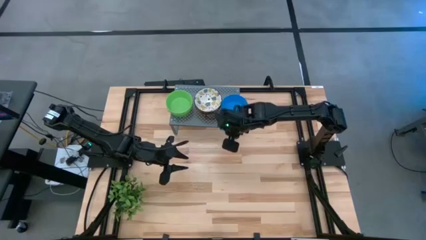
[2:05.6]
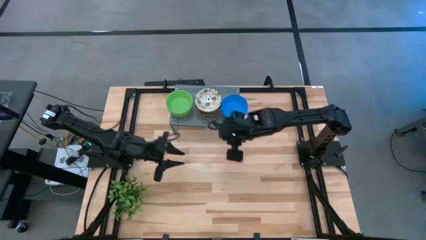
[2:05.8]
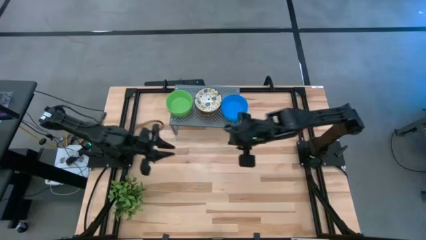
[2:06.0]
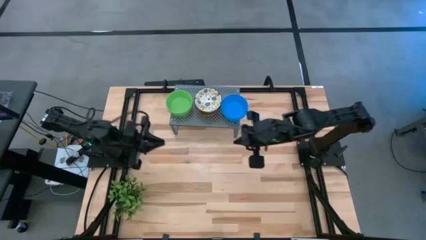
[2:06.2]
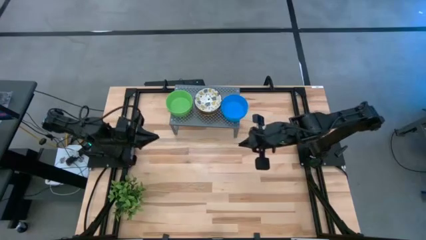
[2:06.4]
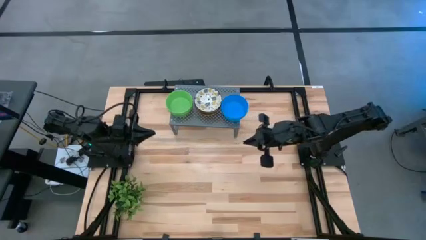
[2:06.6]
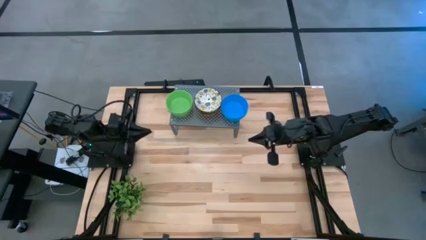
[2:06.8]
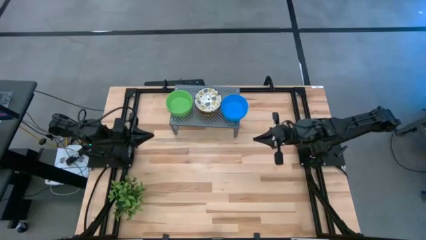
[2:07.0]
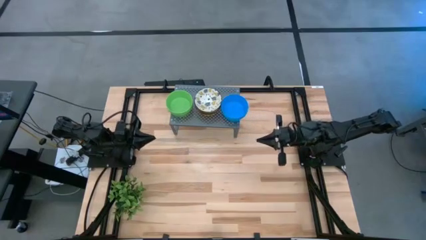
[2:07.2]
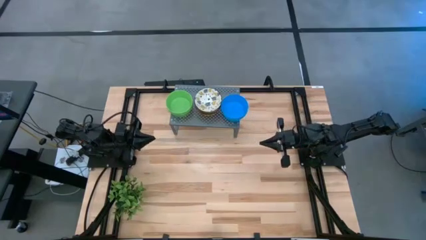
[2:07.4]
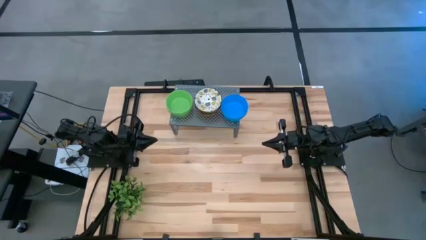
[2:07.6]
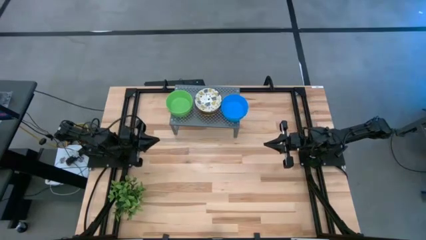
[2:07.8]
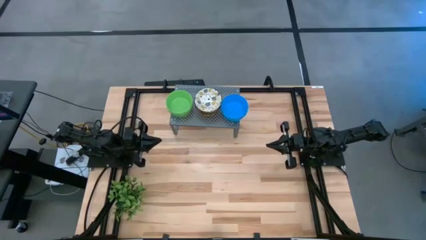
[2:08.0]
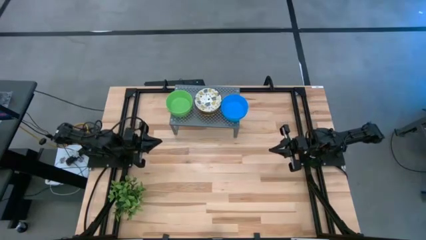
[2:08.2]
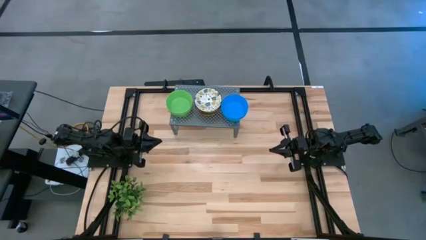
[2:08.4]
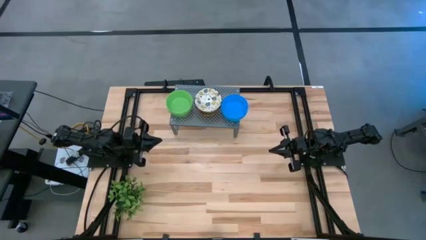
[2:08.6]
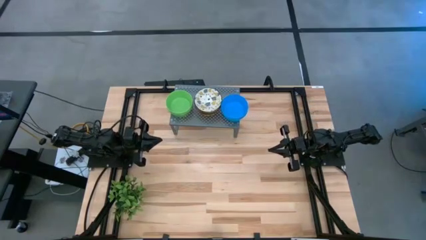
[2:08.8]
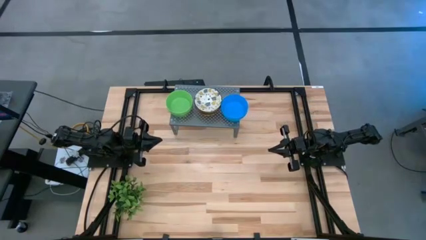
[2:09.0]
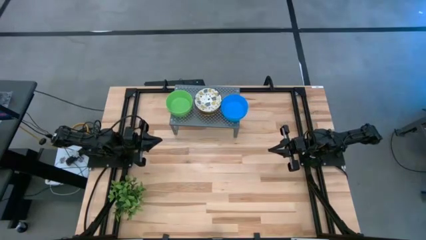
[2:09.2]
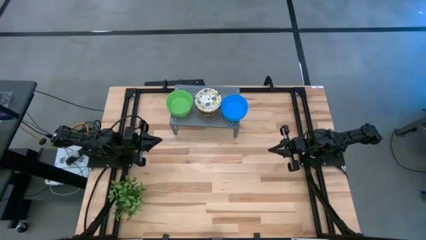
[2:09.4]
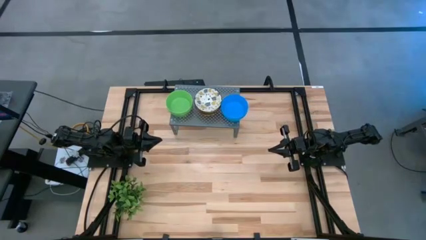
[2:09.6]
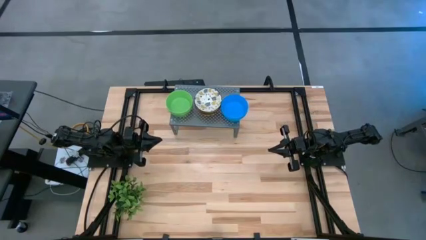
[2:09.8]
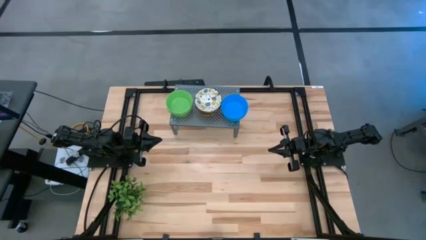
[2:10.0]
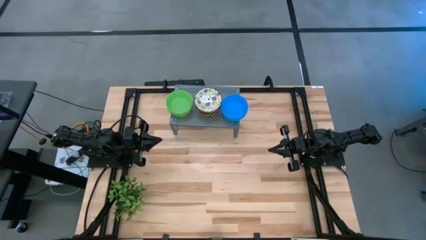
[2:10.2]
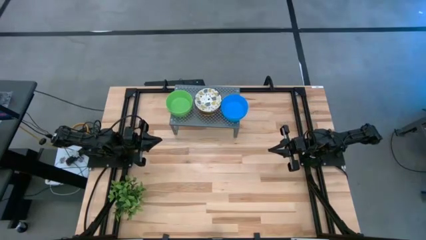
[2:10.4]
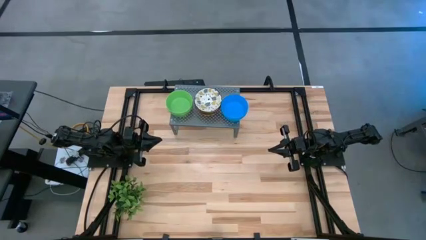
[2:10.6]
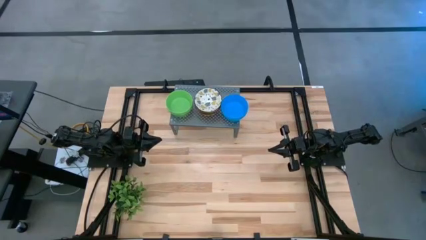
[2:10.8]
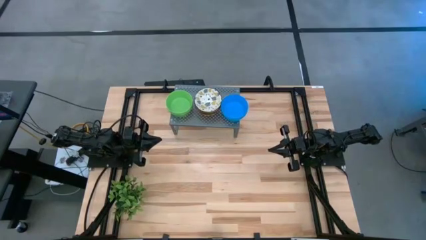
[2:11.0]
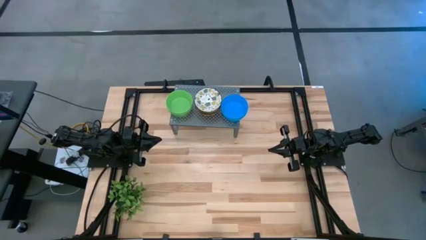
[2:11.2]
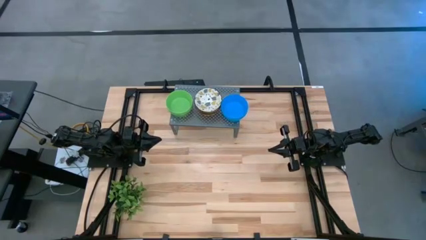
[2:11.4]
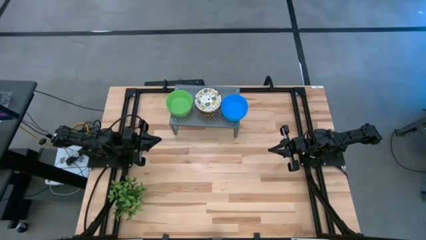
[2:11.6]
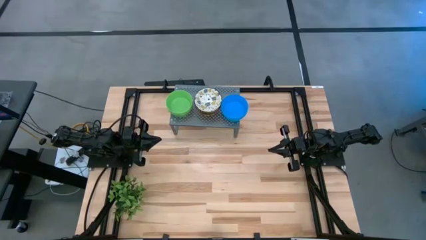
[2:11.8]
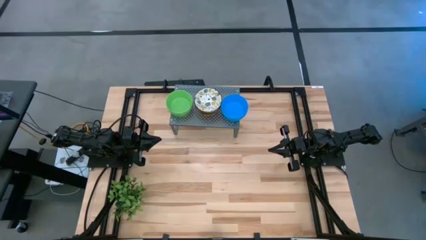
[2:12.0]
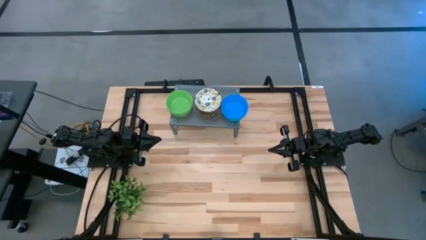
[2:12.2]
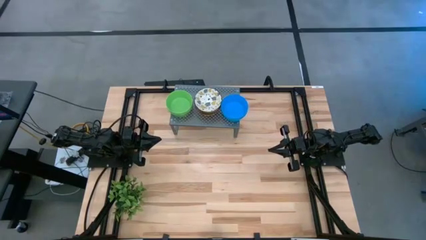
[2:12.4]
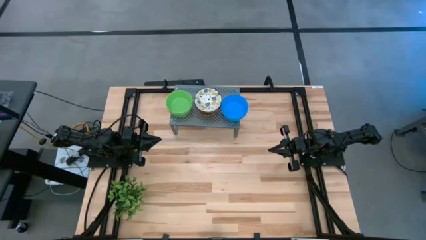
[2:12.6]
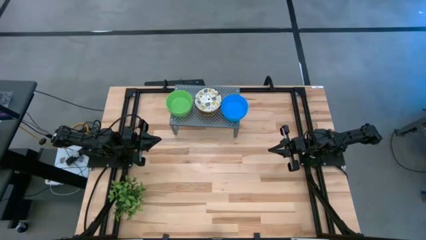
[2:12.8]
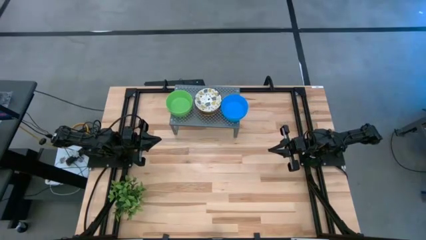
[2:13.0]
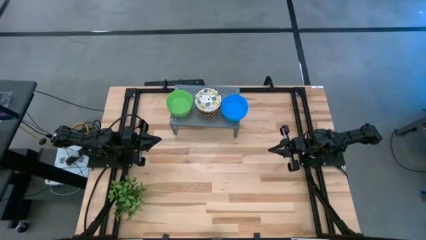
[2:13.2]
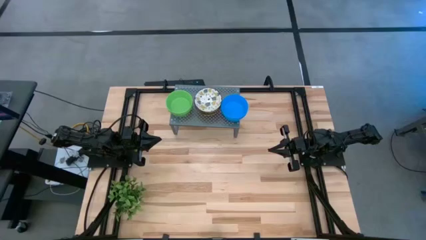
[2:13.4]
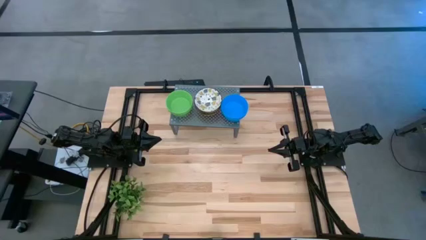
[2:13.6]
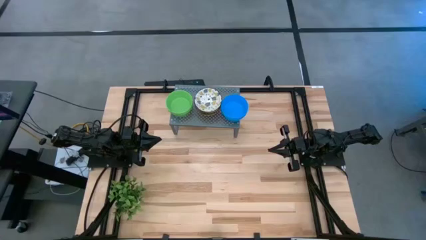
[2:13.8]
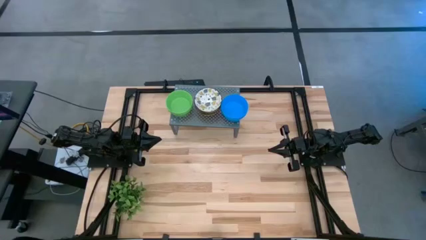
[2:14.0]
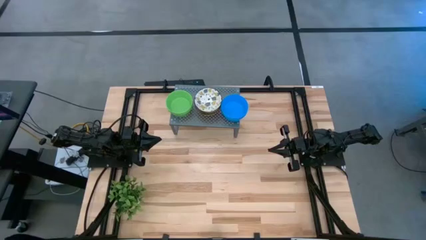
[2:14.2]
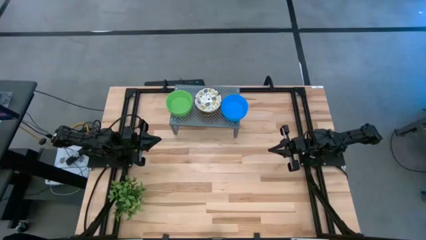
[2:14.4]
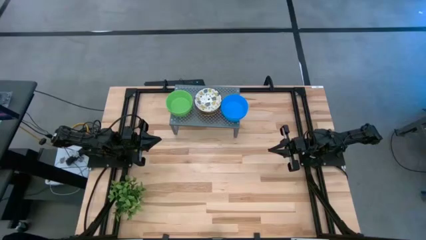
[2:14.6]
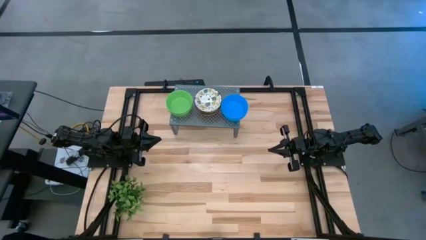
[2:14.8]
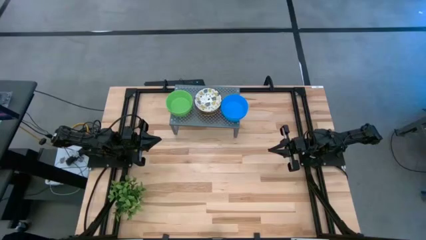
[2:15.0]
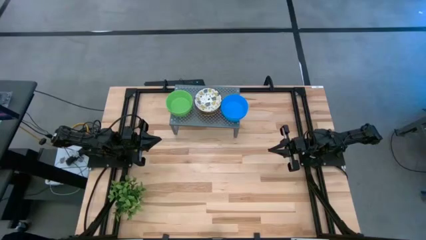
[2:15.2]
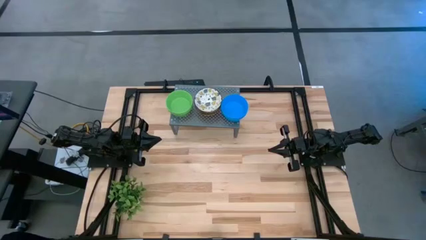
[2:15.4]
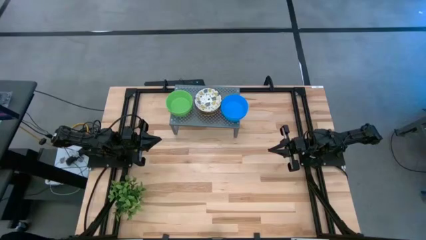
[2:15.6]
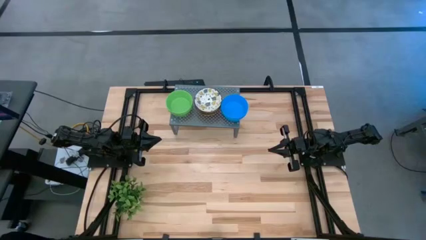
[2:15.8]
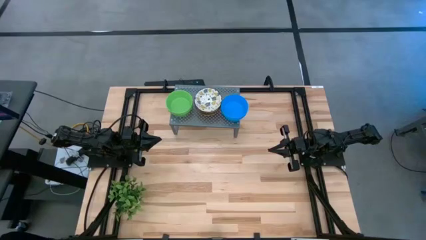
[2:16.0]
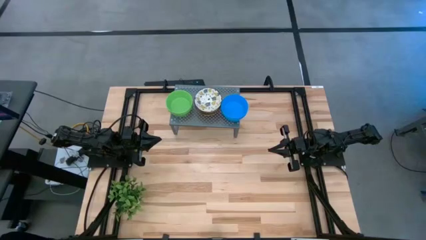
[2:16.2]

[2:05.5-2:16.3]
Task: Pick & Place Mini bowls
Return to Home Position

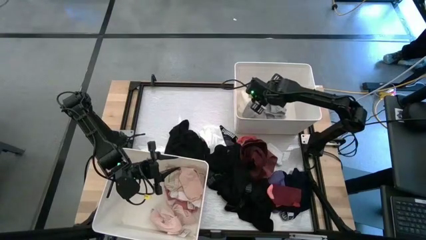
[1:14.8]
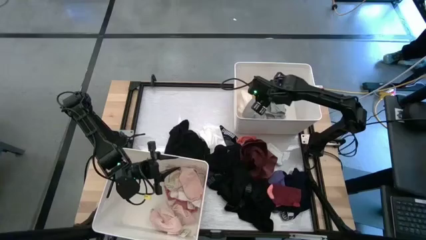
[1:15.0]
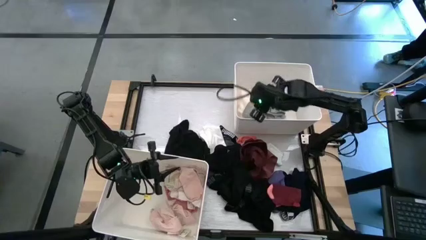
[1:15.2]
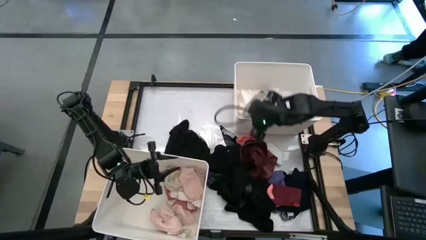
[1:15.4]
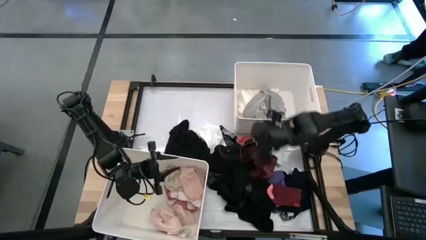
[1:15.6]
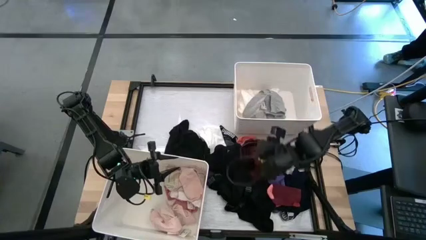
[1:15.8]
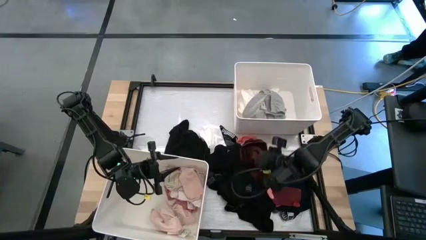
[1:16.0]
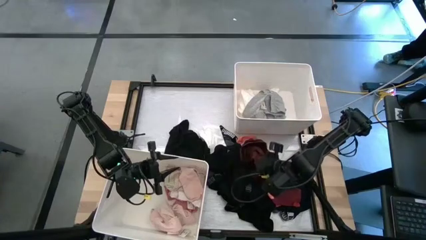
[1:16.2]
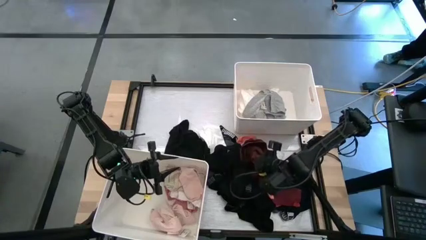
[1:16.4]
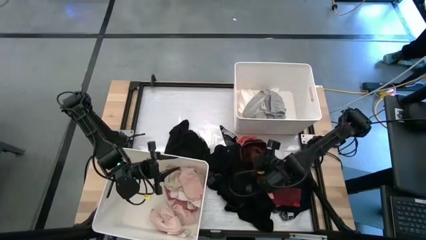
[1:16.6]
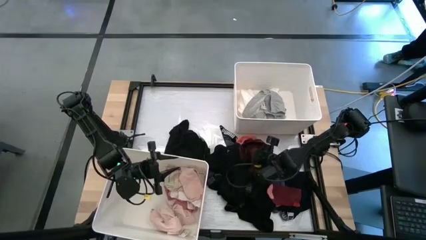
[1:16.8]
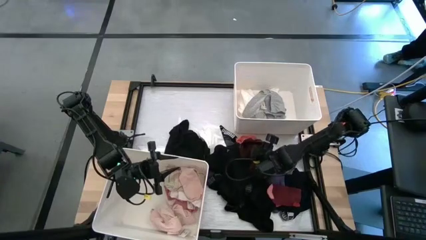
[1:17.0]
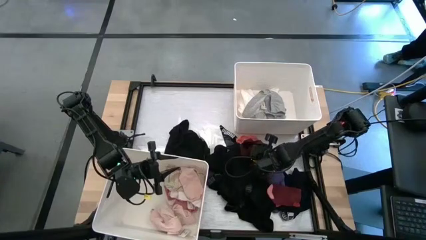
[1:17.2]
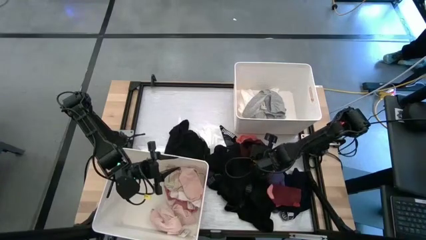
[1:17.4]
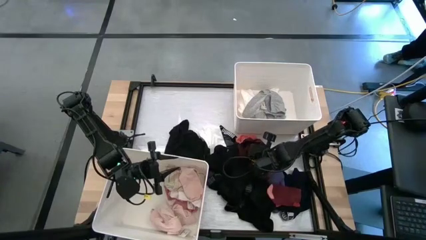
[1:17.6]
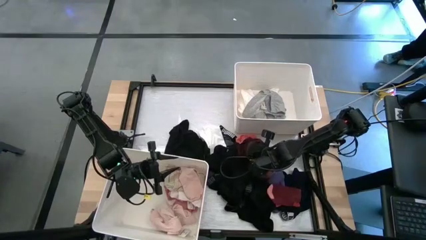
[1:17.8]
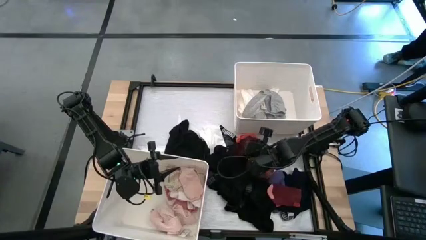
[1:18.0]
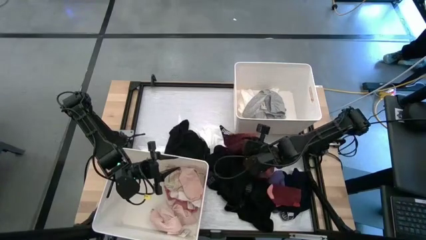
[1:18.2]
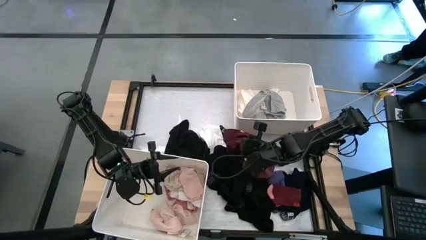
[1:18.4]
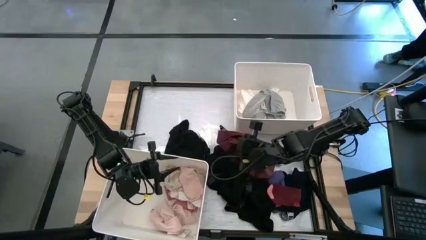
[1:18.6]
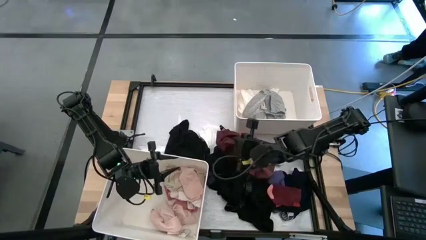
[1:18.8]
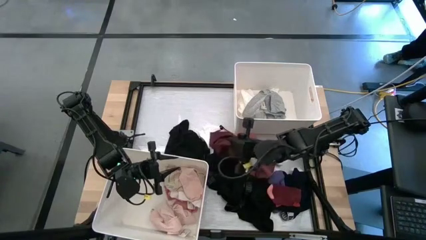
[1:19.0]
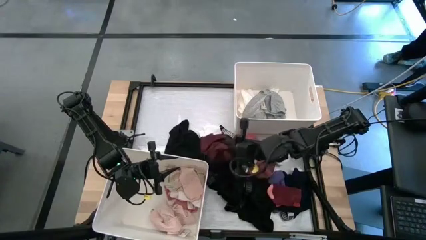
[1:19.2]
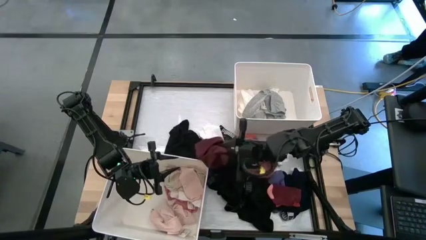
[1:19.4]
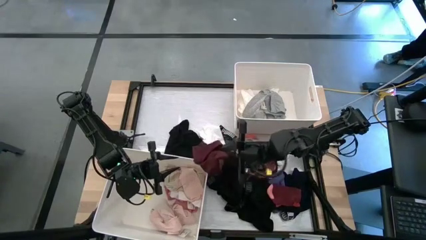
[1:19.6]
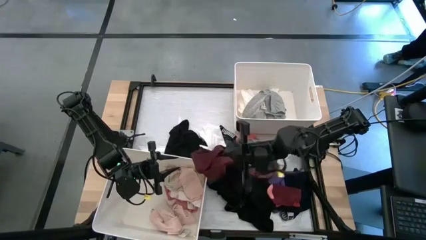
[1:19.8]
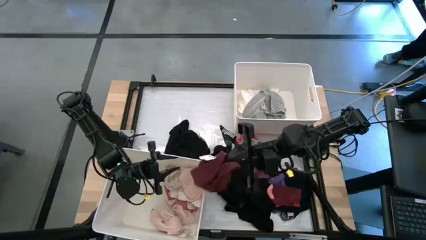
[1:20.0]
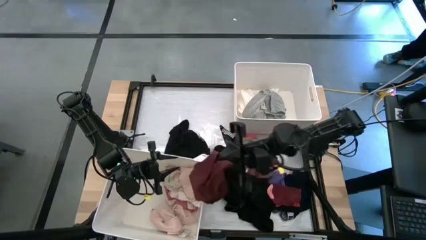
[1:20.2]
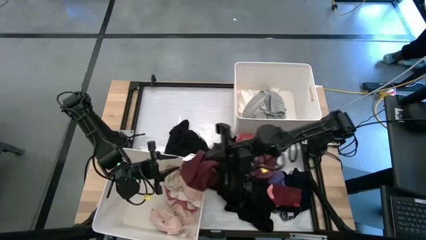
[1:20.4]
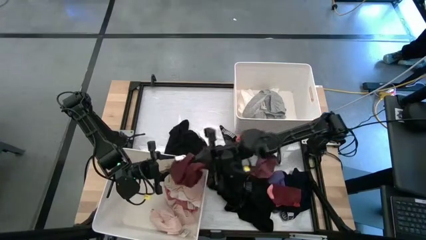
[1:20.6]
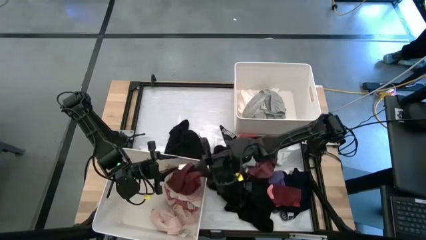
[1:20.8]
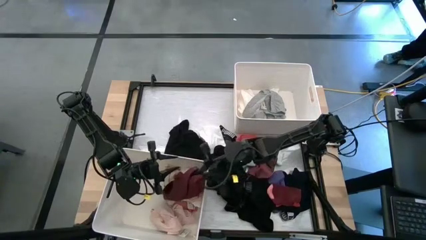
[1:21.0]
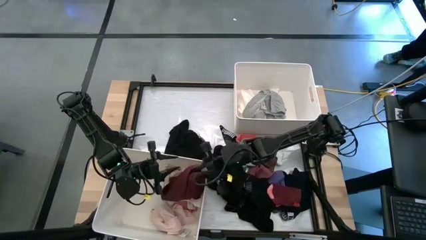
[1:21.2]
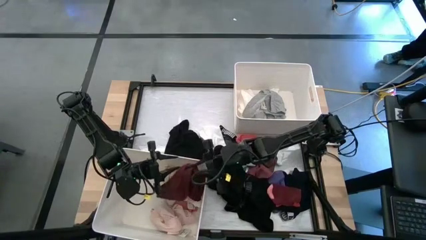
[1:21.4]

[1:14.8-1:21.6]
Task: Sort clothes
Put the maroon shirt into the bottom white bin
